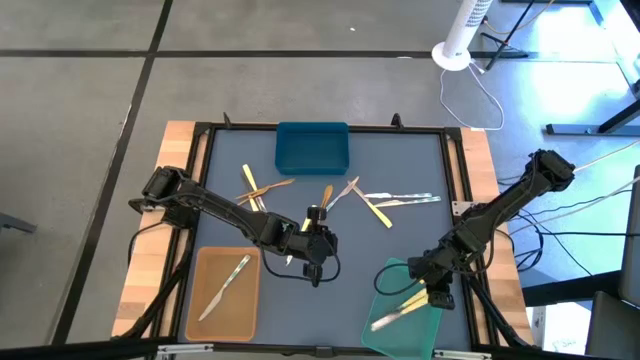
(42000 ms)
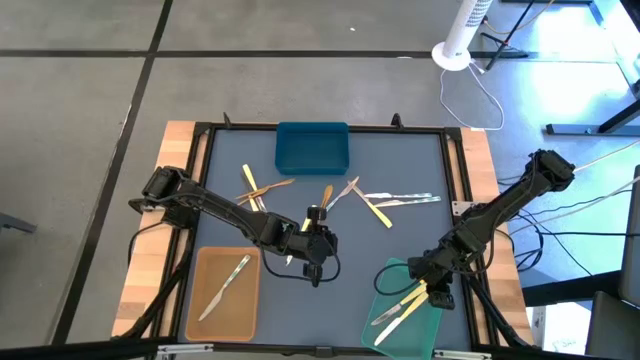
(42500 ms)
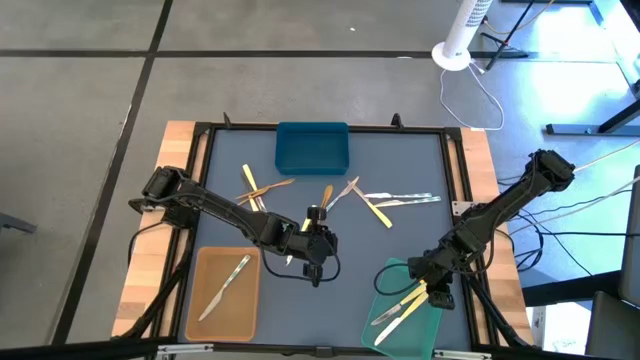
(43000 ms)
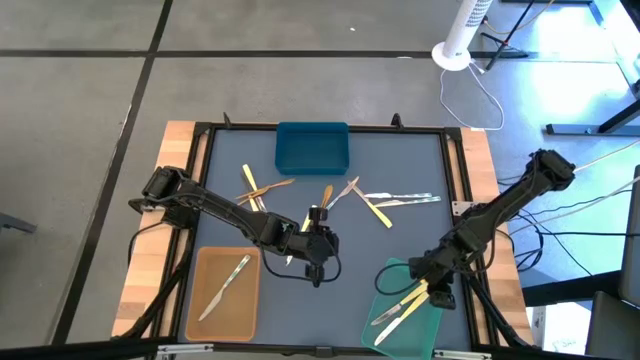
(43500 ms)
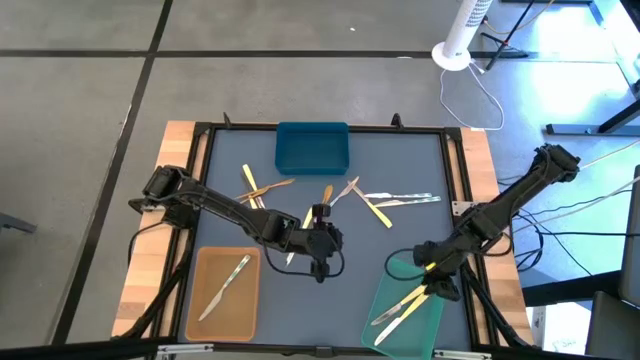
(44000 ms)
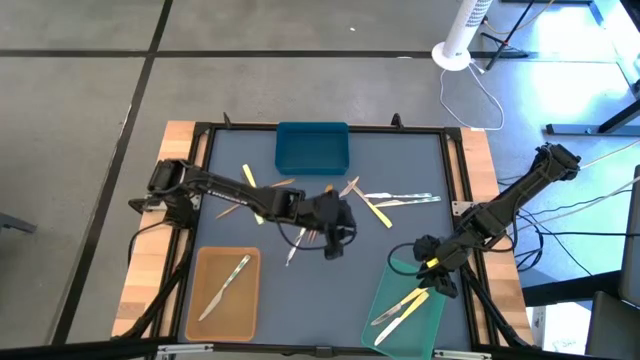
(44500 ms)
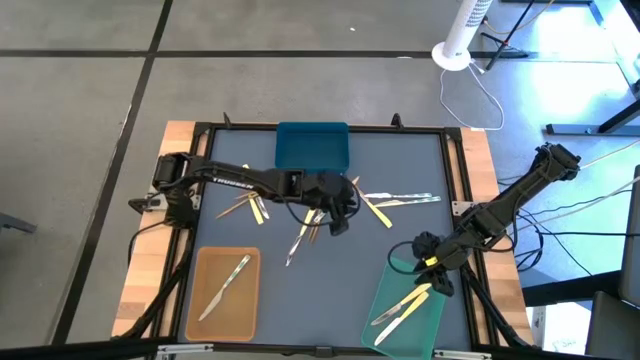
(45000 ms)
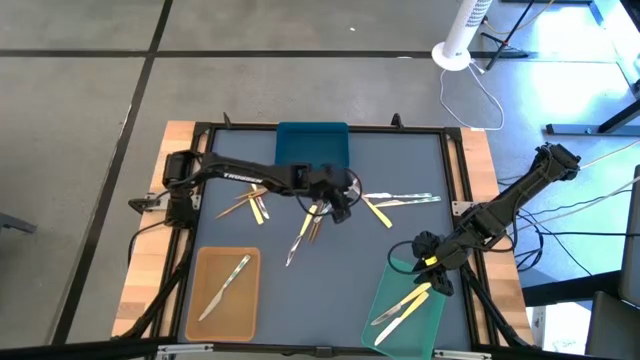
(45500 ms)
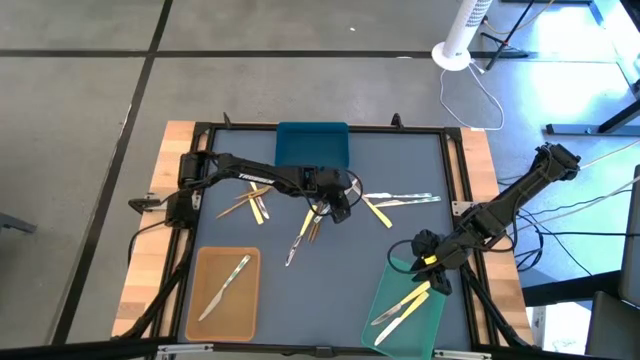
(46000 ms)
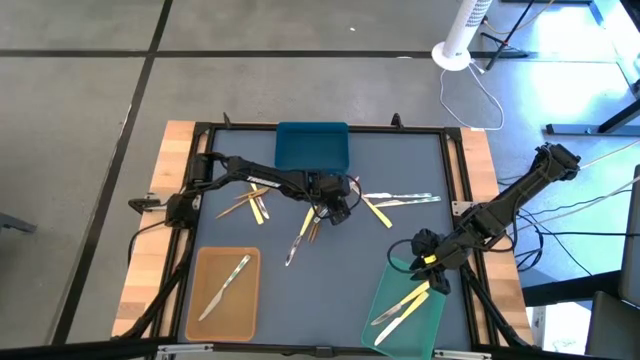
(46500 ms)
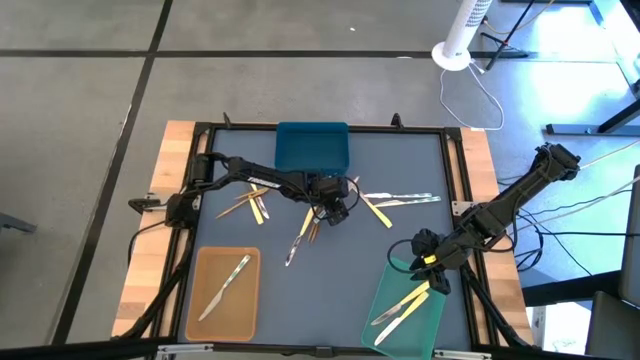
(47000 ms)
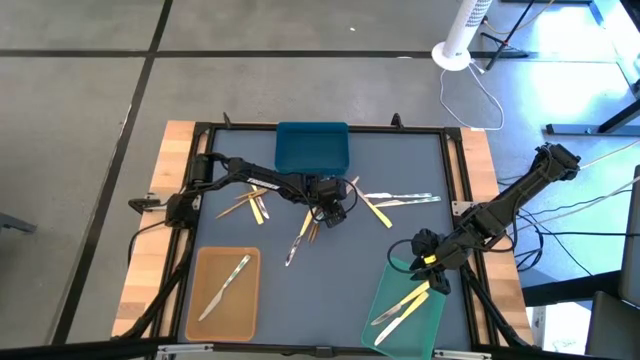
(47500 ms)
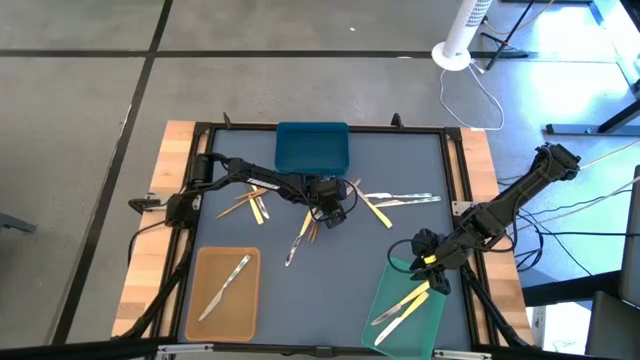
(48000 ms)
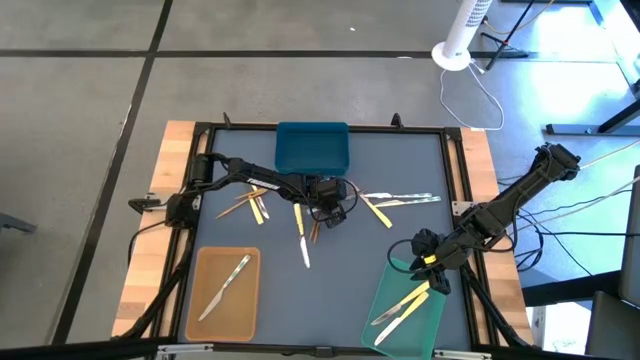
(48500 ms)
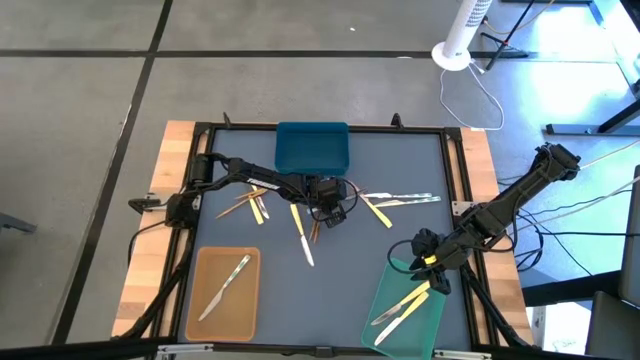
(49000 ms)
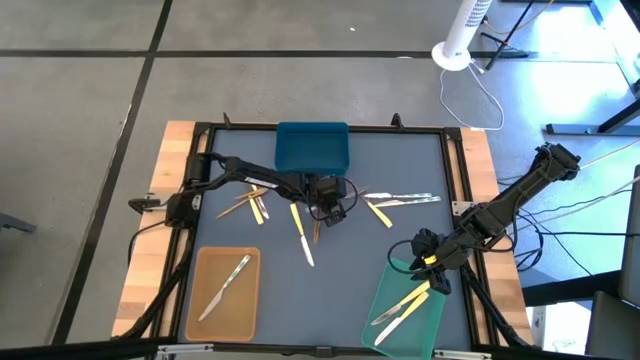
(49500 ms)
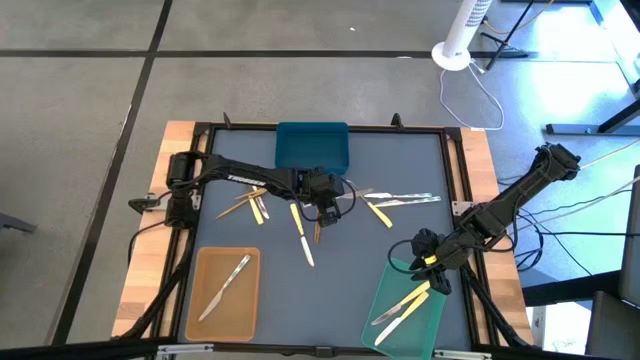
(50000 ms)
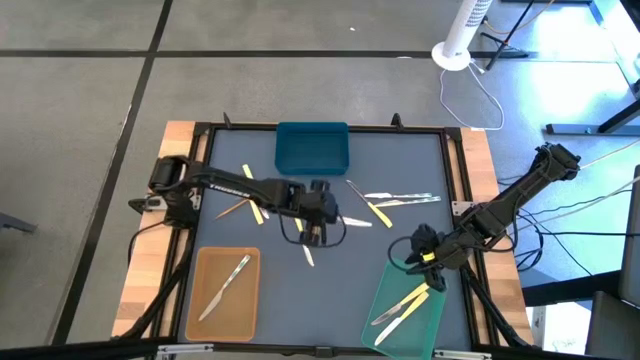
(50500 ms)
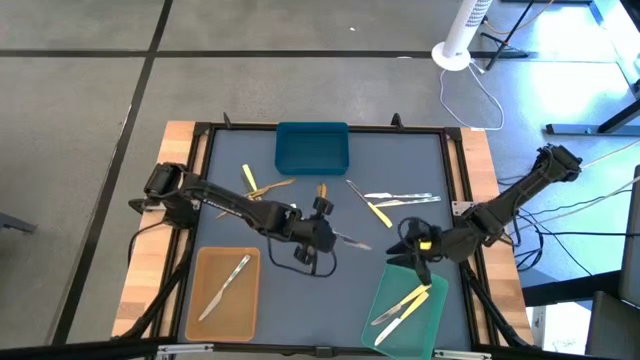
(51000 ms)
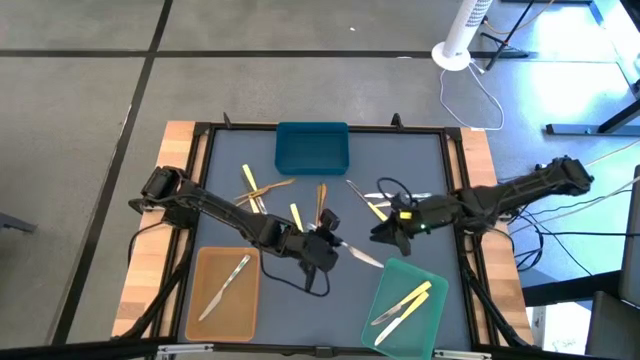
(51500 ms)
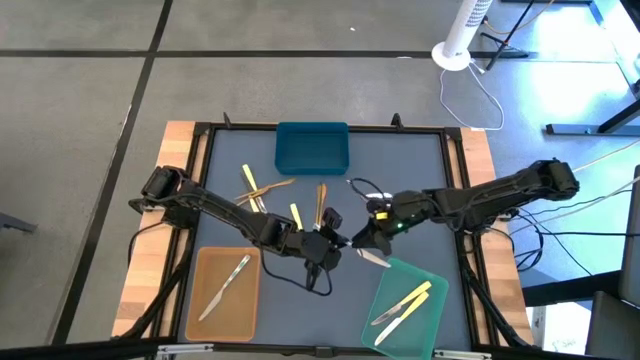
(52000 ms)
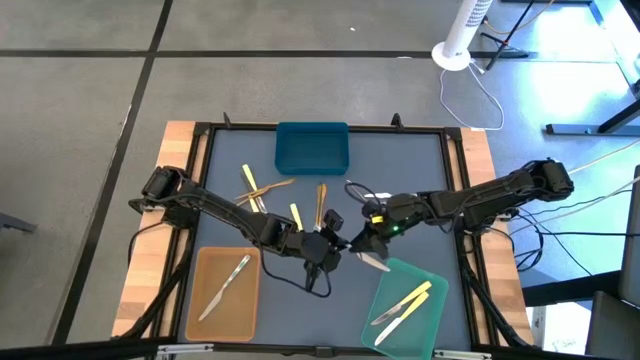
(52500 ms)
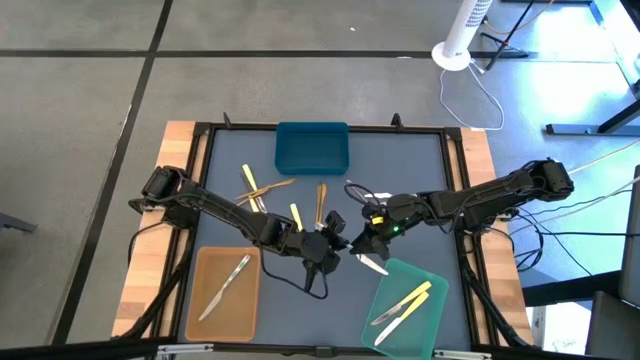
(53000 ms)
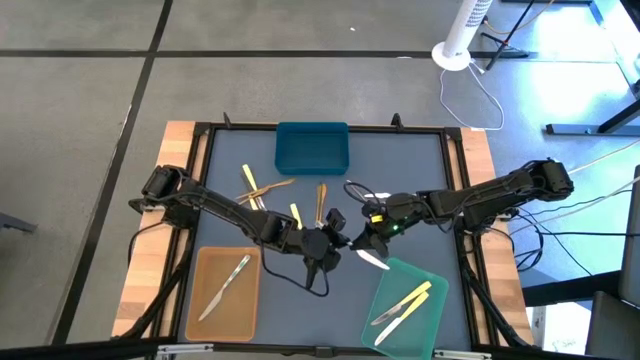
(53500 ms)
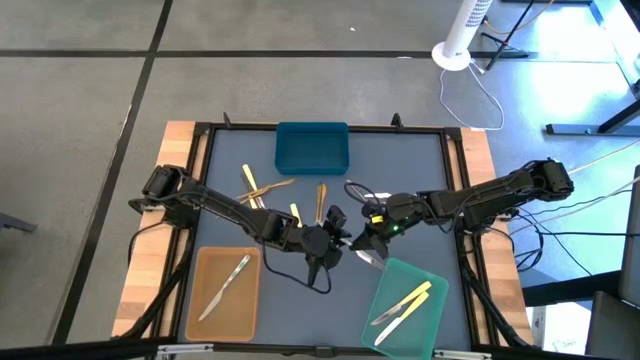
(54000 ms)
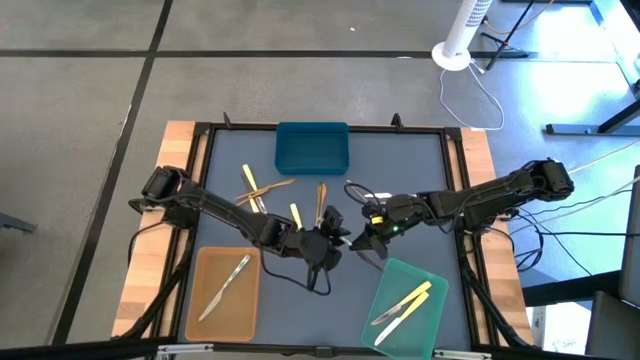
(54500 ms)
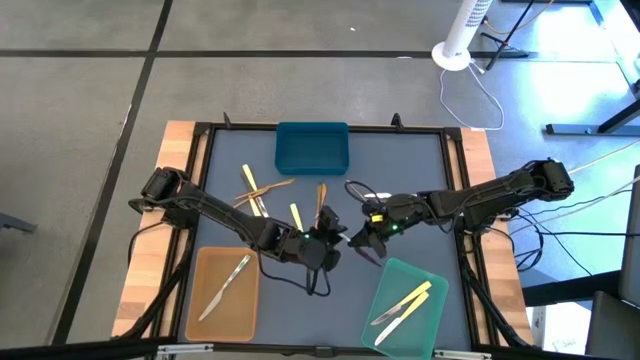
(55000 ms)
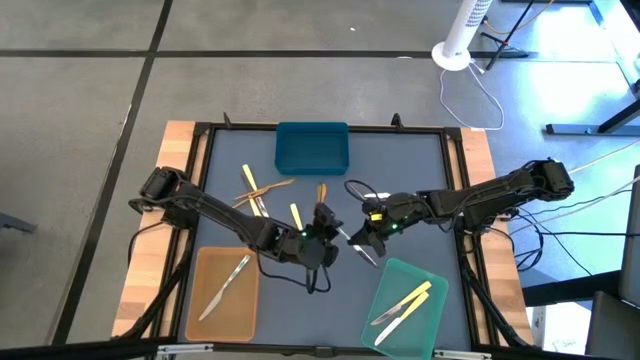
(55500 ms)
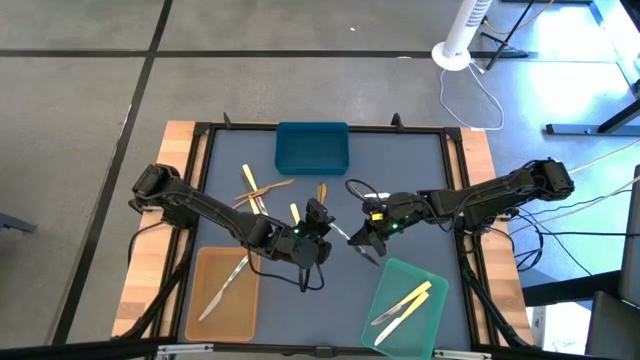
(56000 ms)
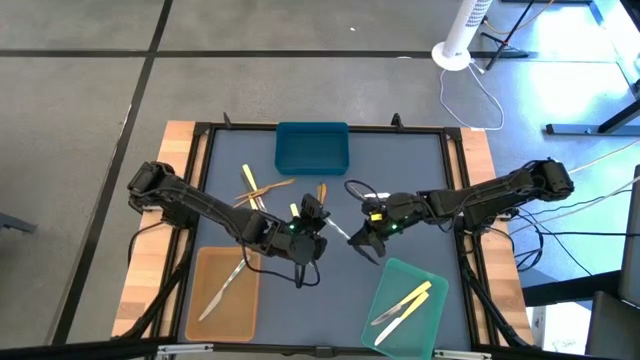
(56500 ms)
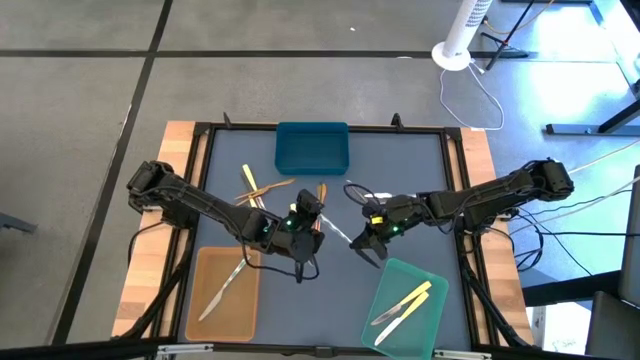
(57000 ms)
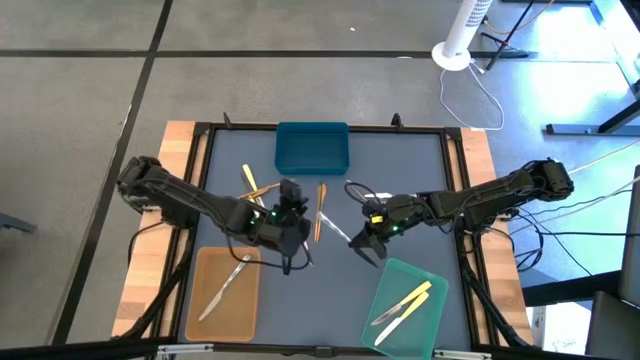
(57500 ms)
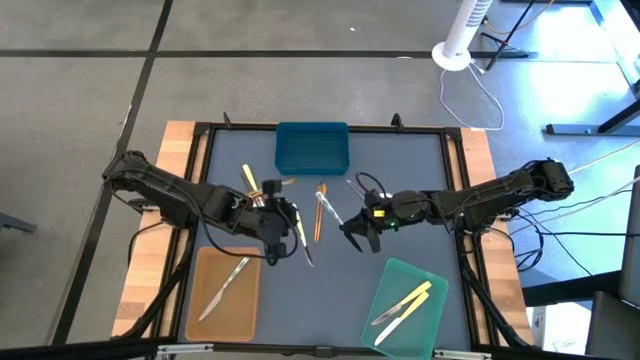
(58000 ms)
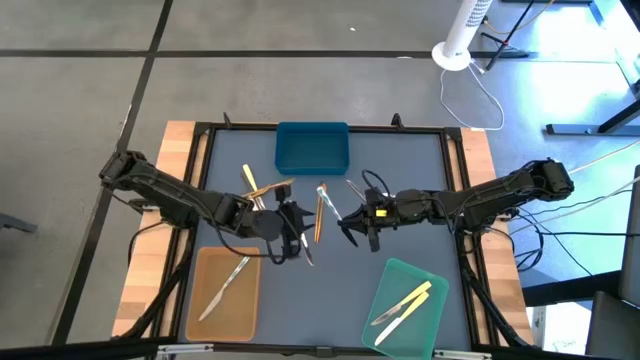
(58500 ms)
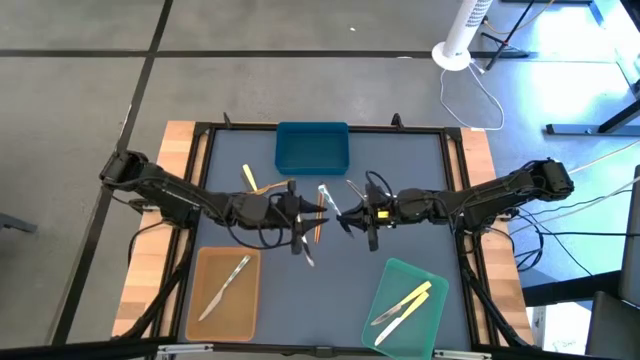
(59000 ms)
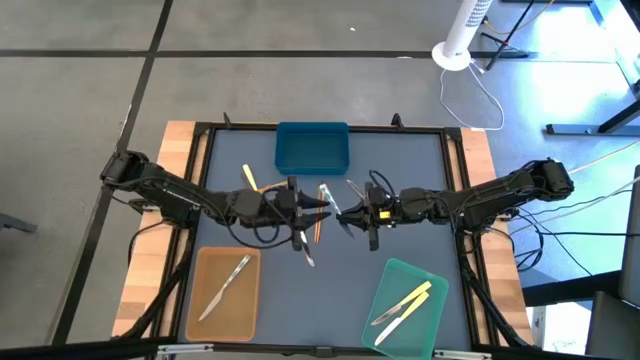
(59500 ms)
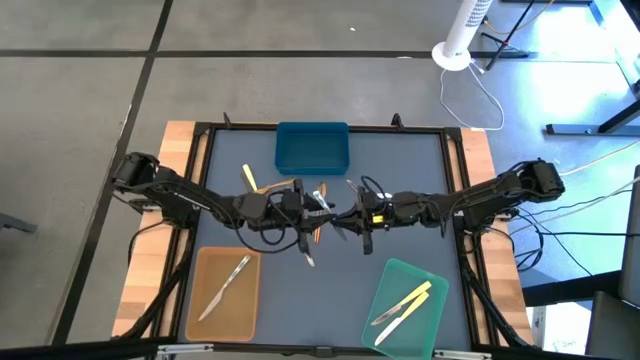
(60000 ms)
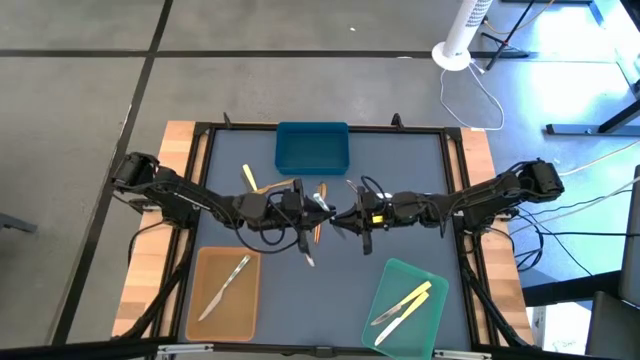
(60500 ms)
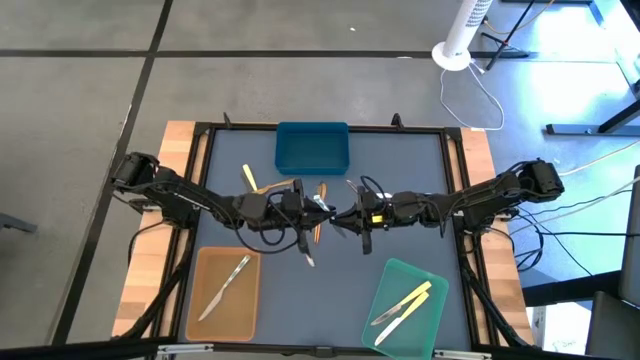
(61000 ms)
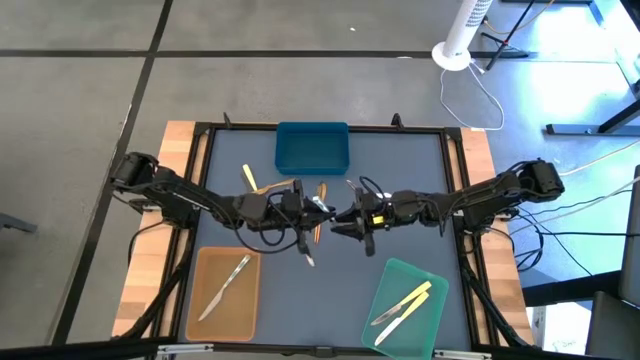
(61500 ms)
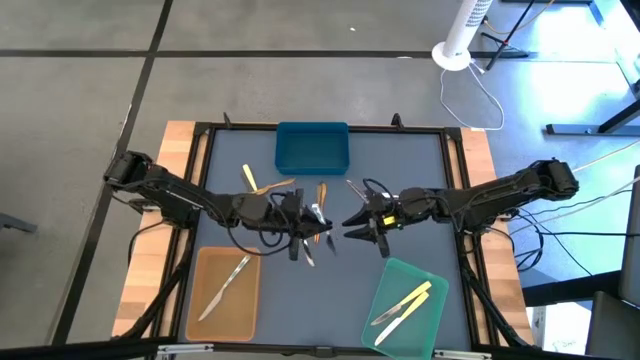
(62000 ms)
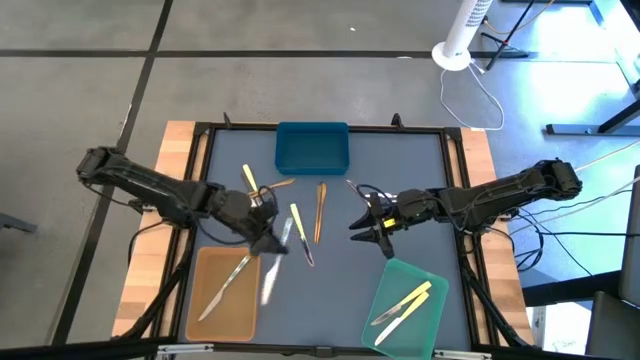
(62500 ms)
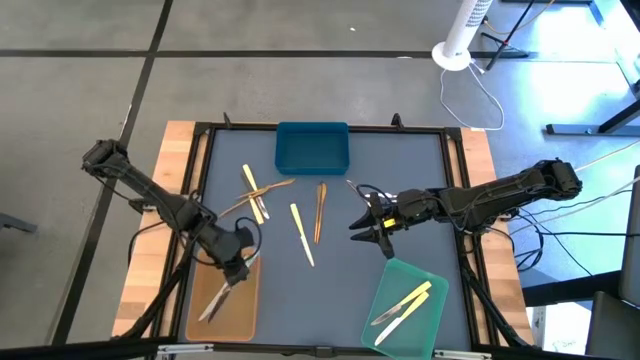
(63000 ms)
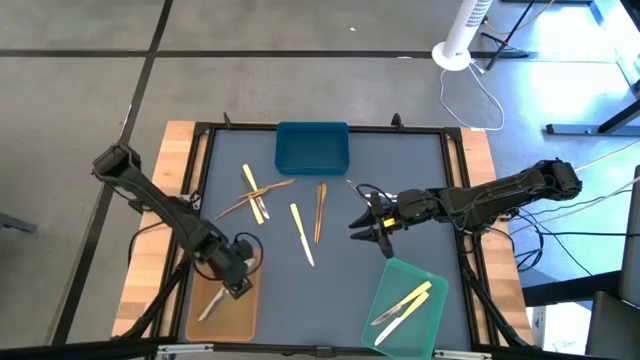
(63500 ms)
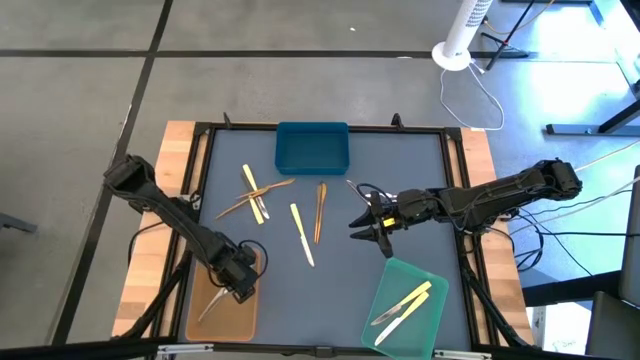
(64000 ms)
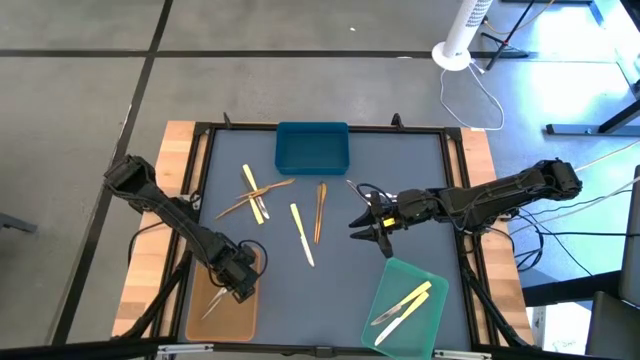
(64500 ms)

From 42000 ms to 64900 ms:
Task: Sort silverware by color (type)
Put the green patterned knife into the orange bin
